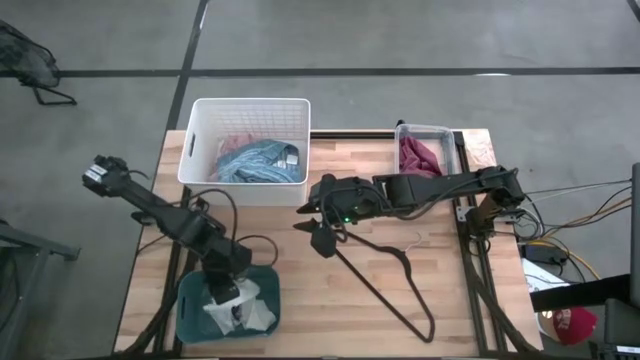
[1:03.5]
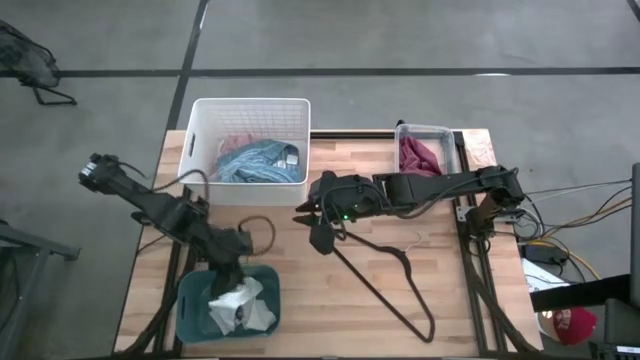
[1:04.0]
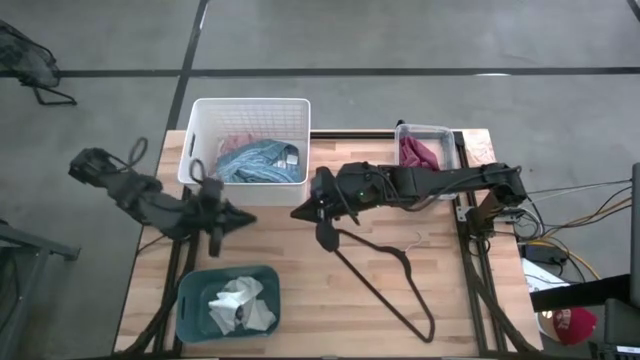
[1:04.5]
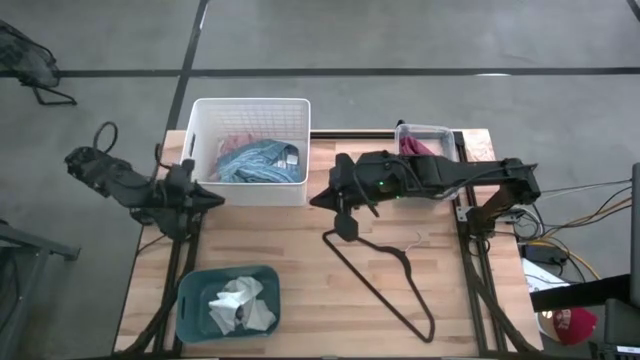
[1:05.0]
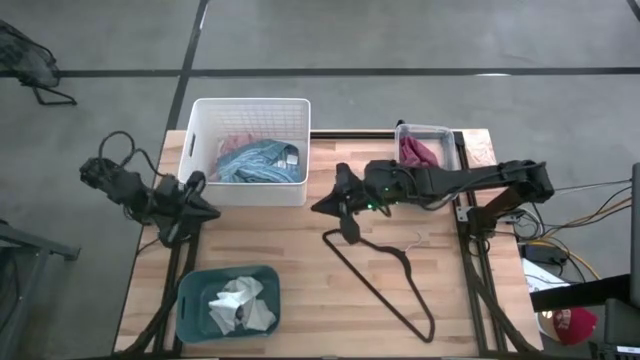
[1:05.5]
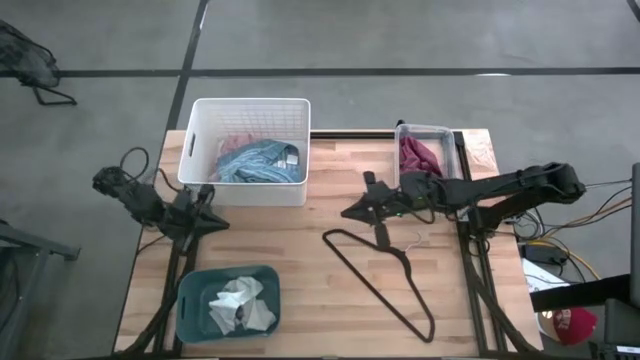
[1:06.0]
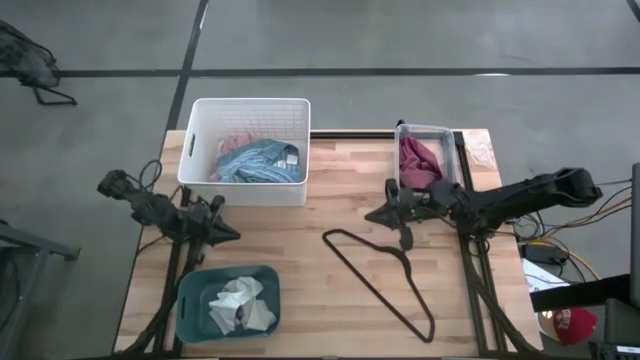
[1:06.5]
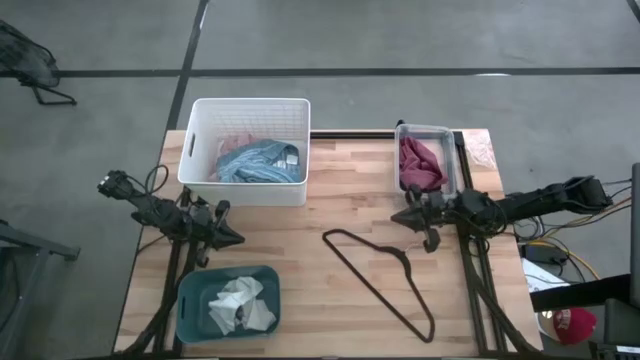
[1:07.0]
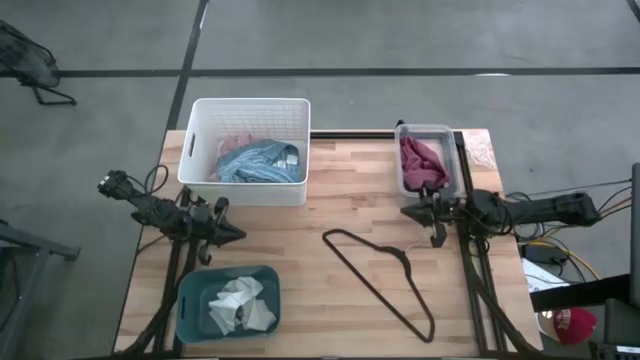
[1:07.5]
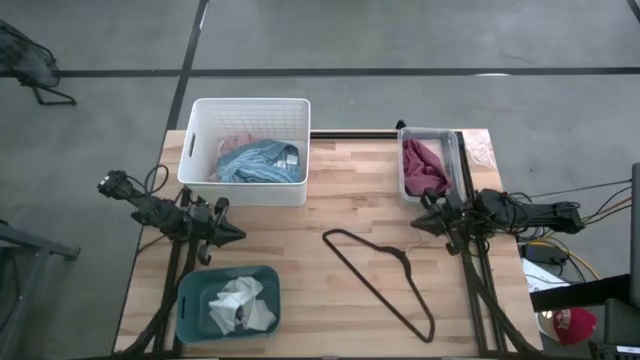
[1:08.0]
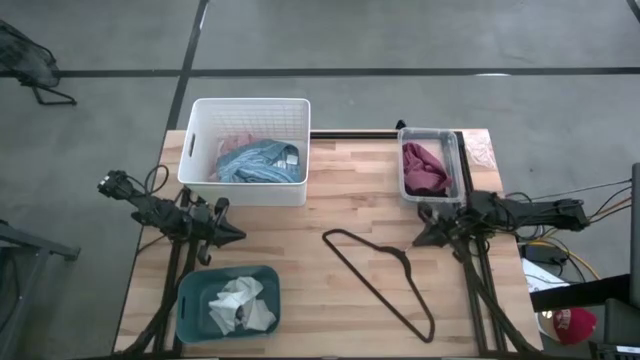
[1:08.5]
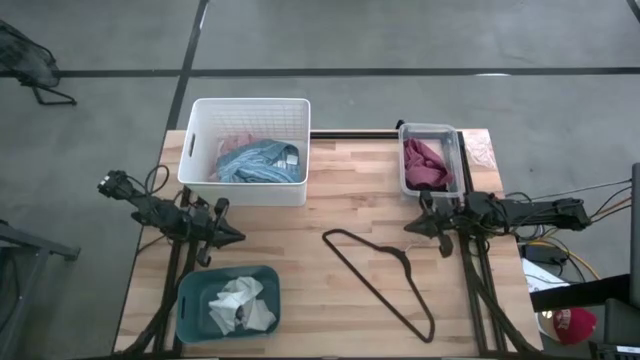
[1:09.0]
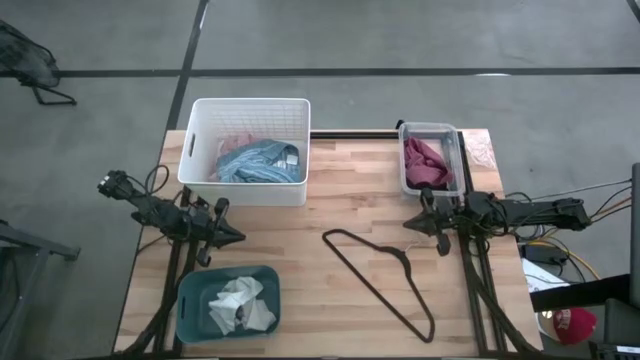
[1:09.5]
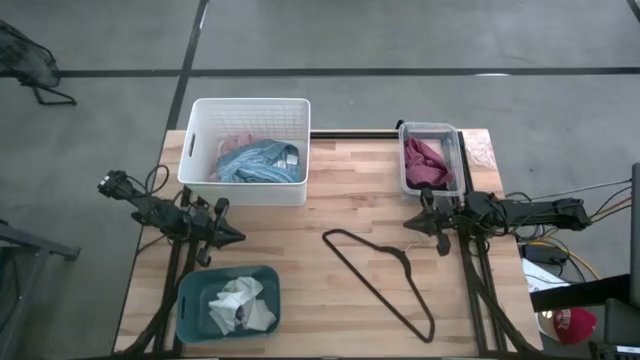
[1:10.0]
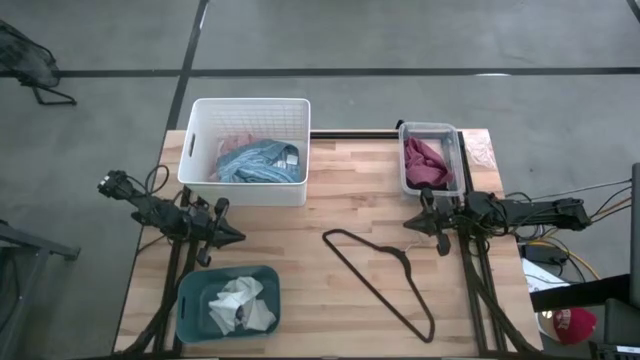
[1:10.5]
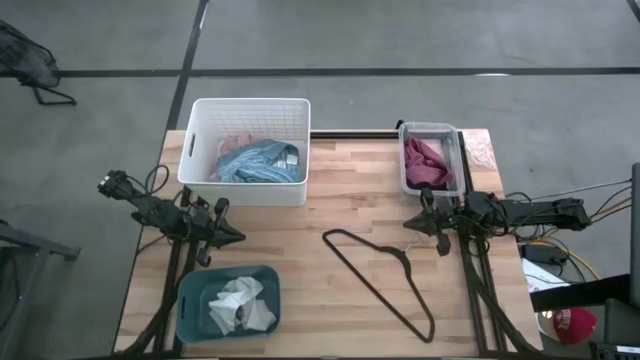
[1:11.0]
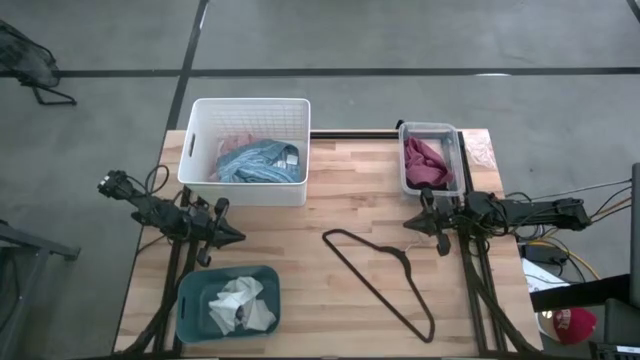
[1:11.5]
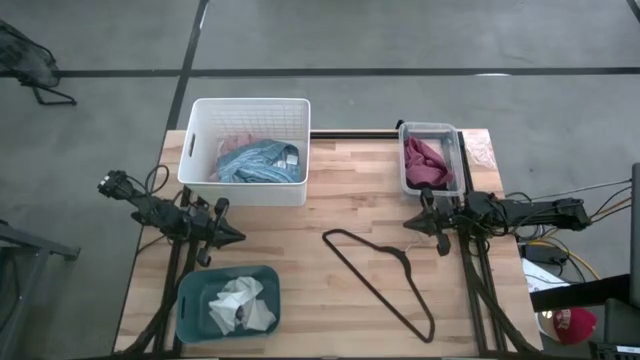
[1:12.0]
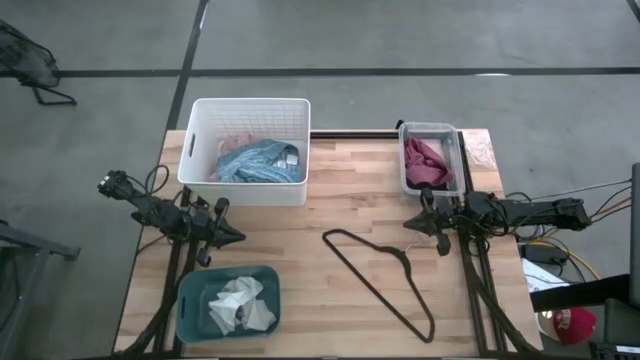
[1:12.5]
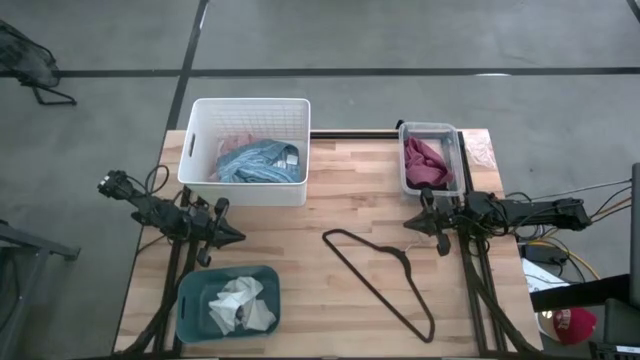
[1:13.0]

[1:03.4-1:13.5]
Task: Pick & Place Cloths
Return to Home Position

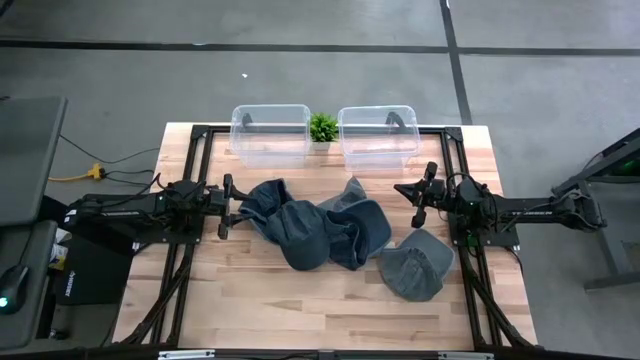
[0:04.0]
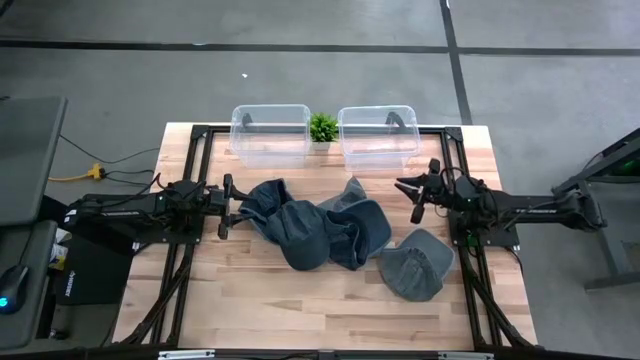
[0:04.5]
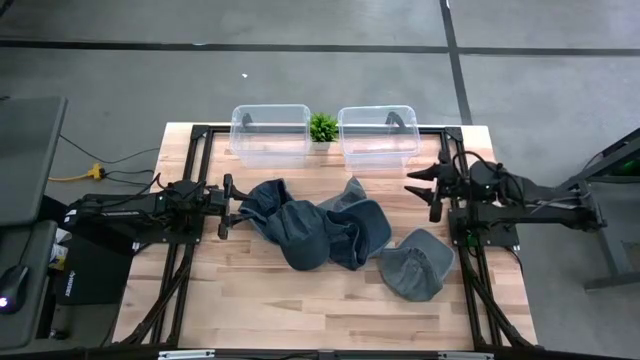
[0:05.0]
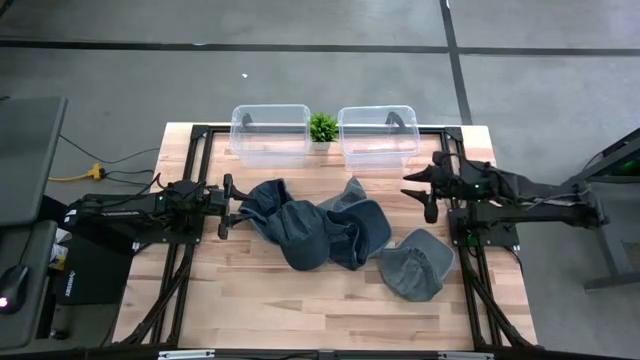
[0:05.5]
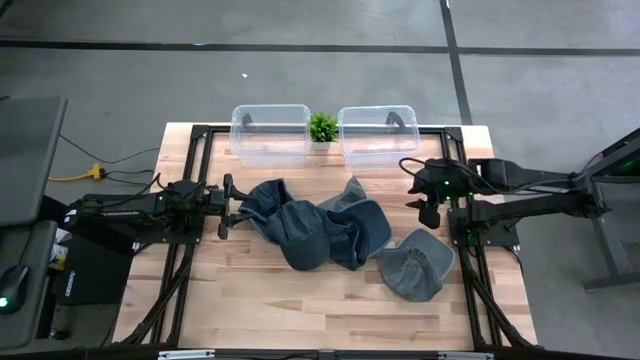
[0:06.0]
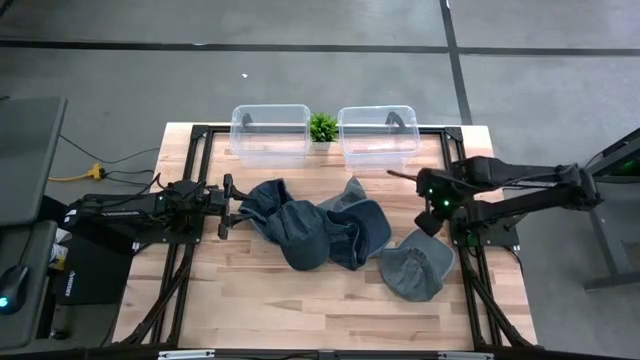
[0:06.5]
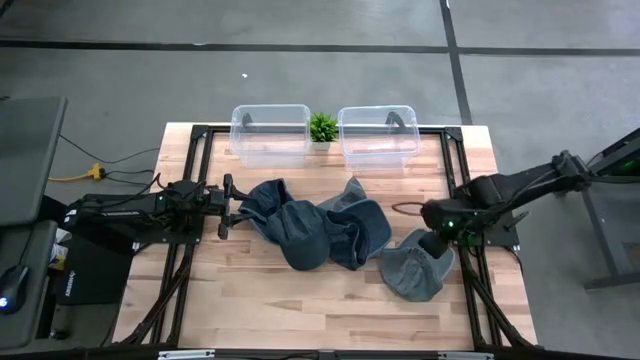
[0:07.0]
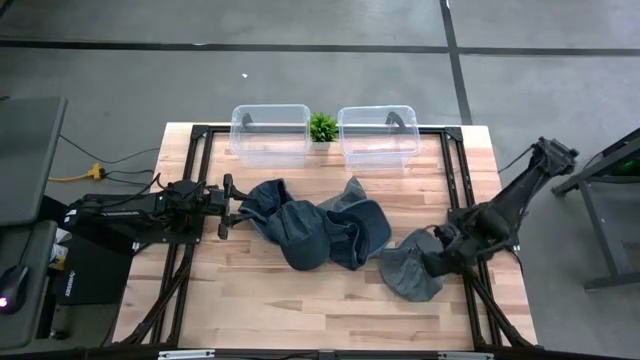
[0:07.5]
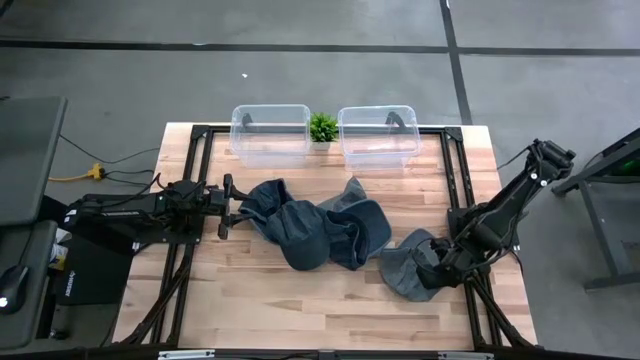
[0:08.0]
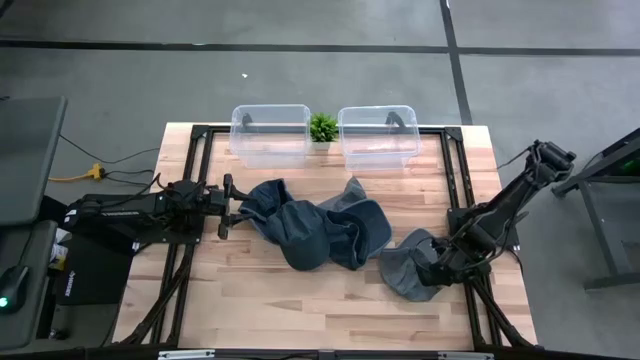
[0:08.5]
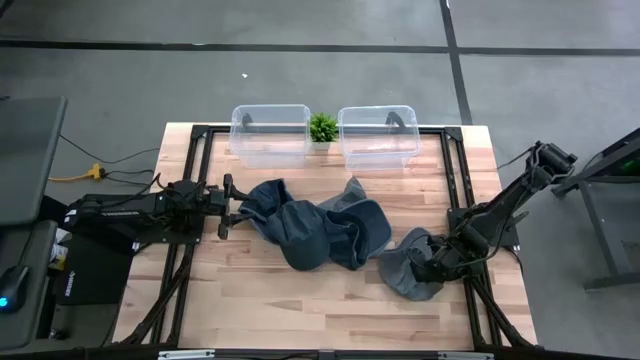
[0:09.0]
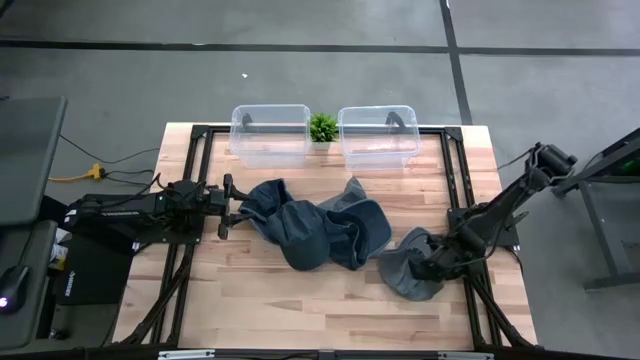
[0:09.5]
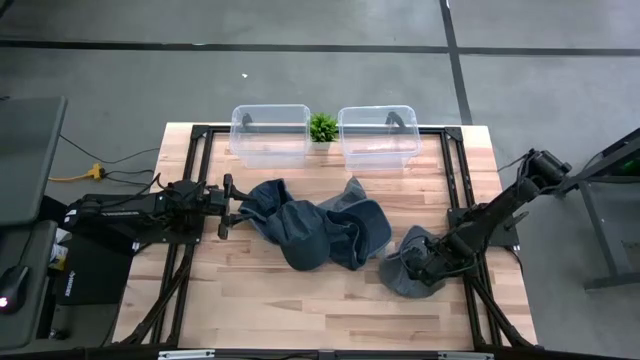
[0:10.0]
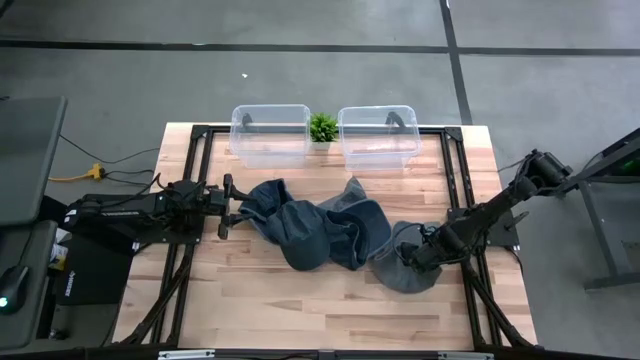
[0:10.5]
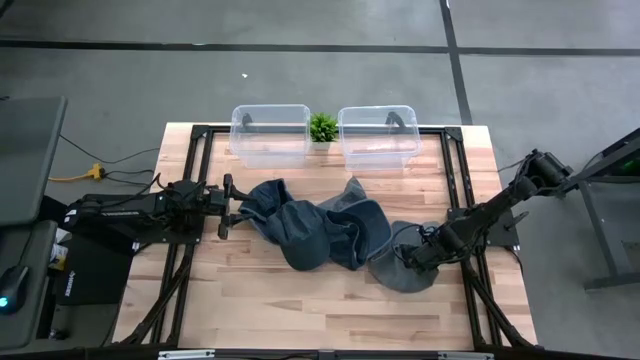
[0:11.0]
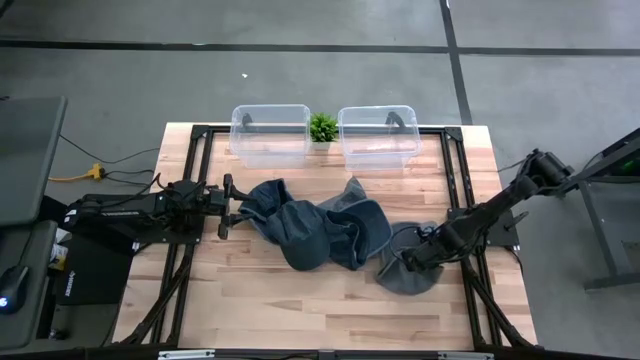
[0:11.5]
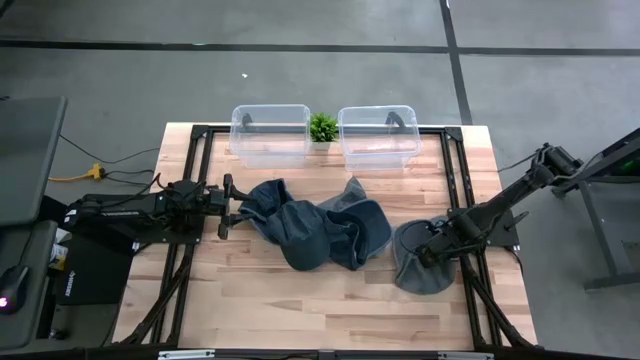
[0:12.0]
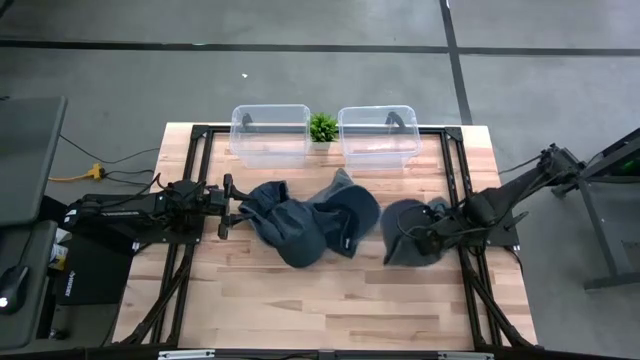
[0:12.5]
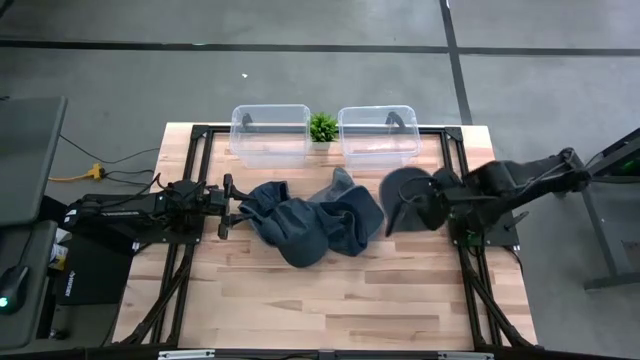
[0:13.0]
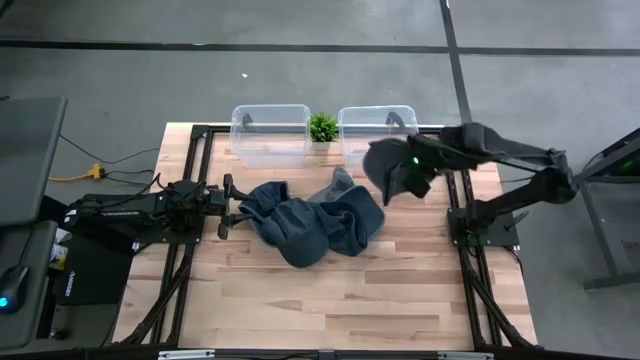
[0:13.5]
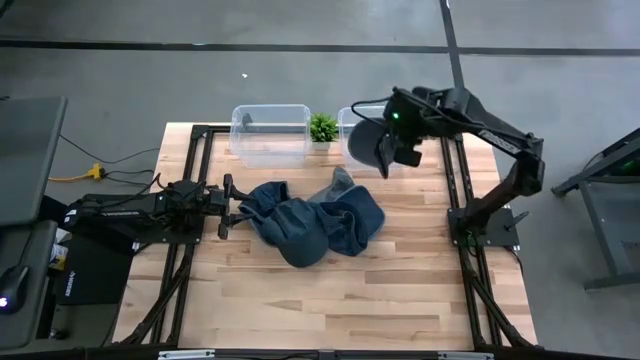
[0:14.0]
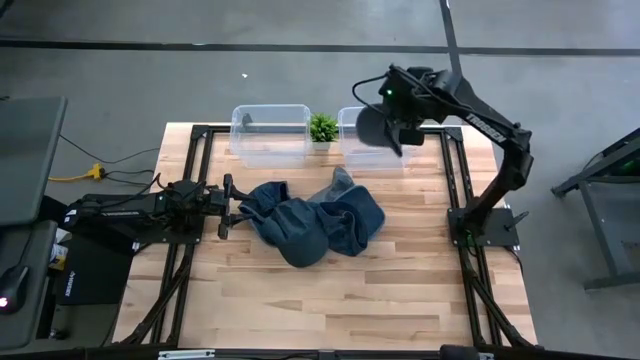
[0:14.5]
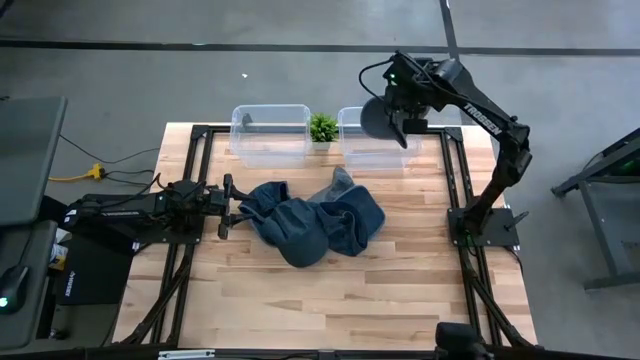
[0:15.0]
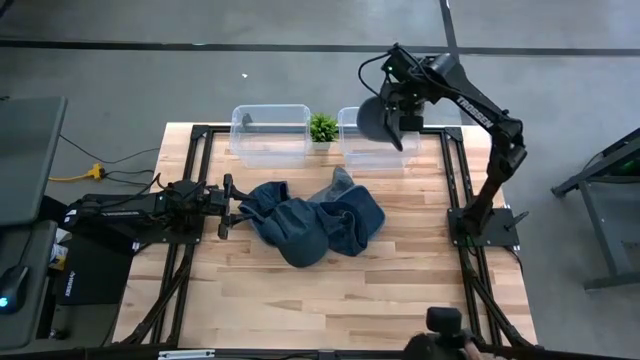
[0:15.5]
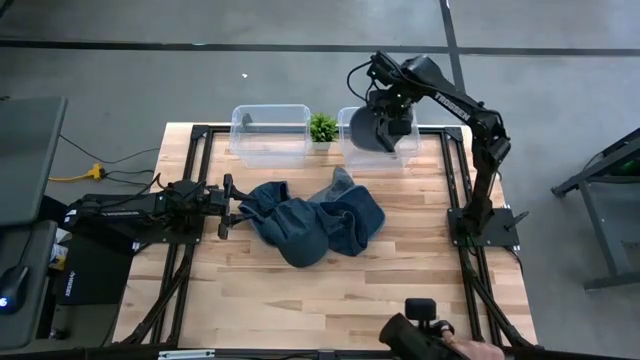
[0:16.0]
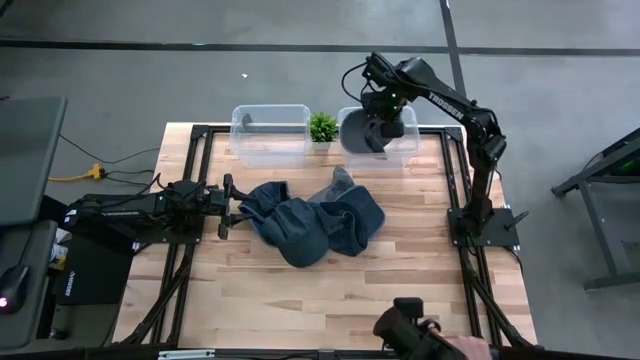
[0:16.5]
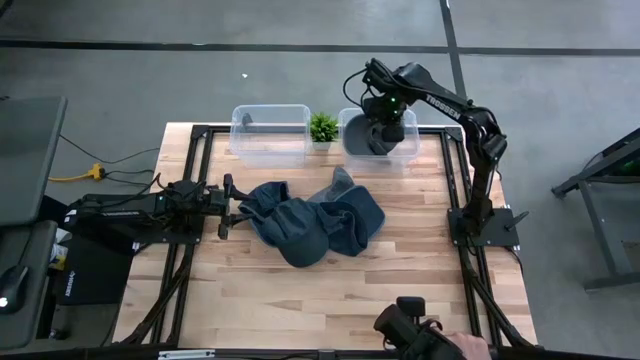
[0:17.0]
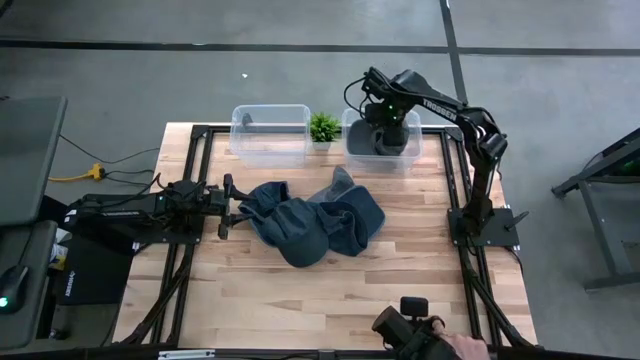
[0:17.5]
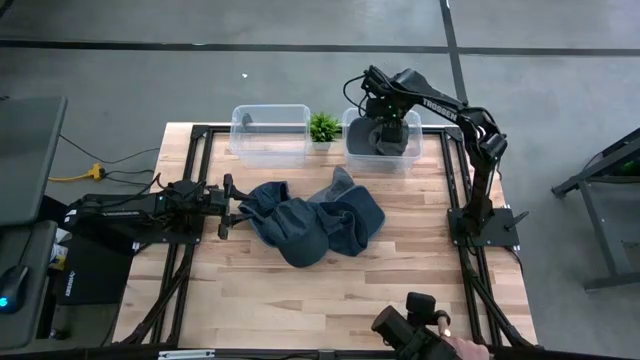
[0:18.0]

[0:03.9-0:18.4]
Task: Pick & Place hat
Put the right gray cap into the right transparent bin
